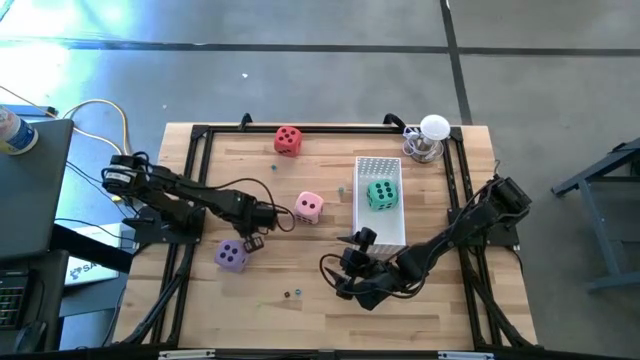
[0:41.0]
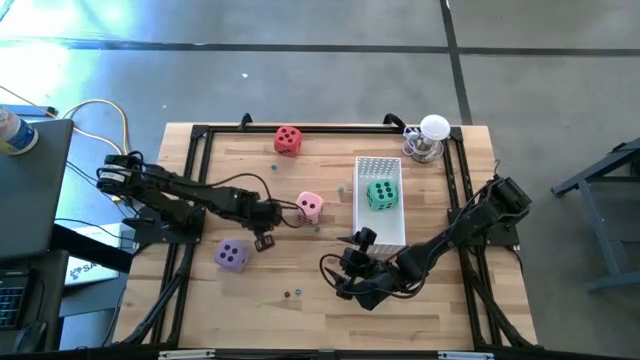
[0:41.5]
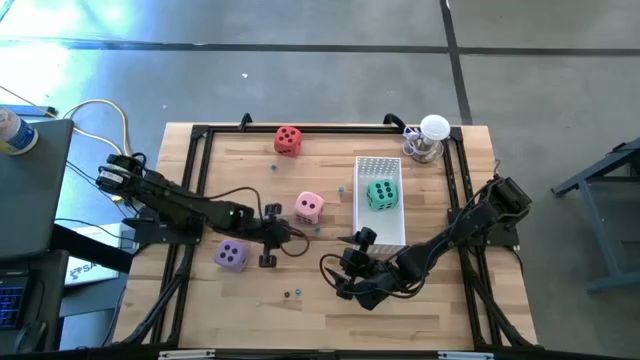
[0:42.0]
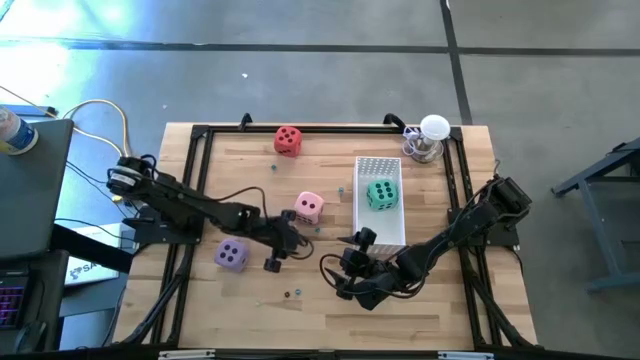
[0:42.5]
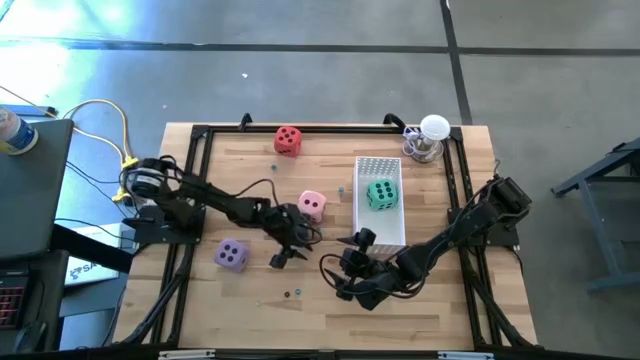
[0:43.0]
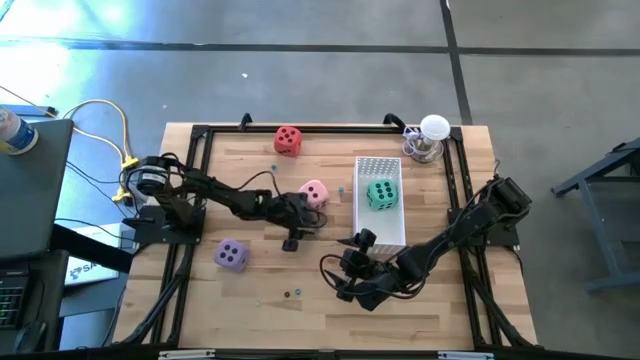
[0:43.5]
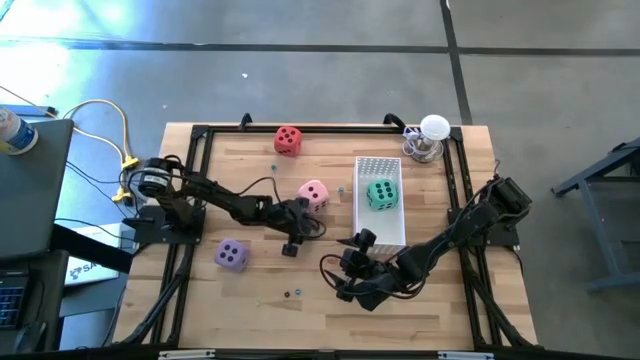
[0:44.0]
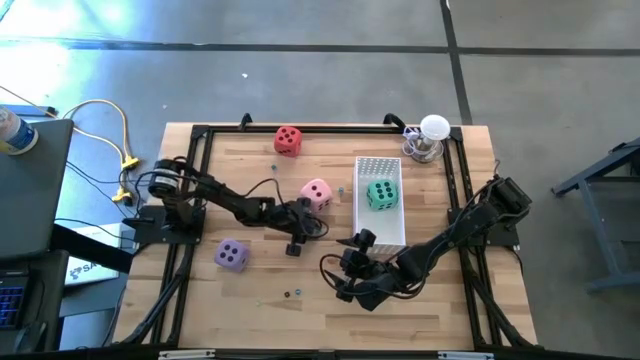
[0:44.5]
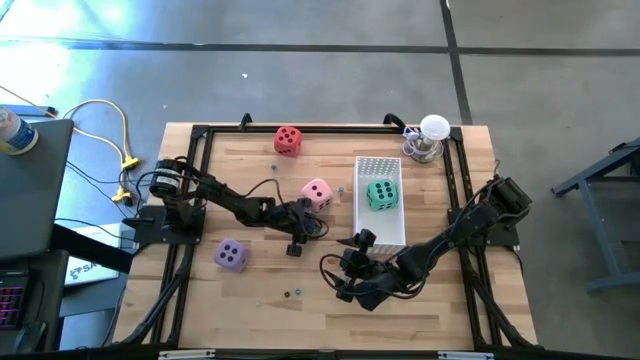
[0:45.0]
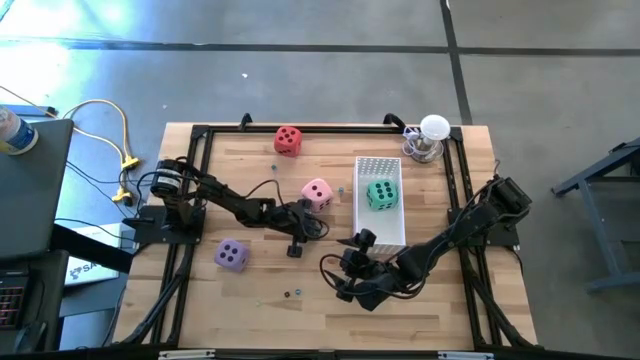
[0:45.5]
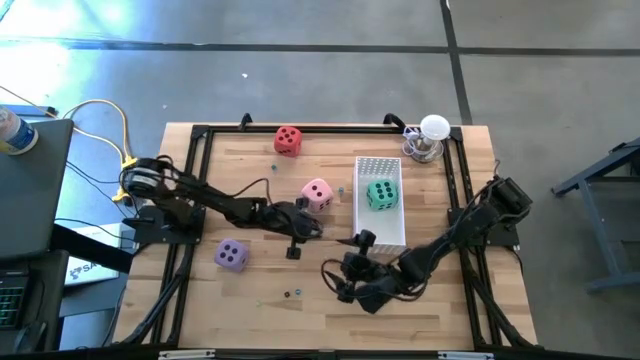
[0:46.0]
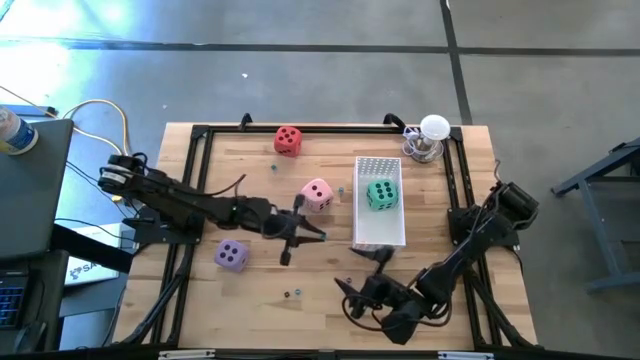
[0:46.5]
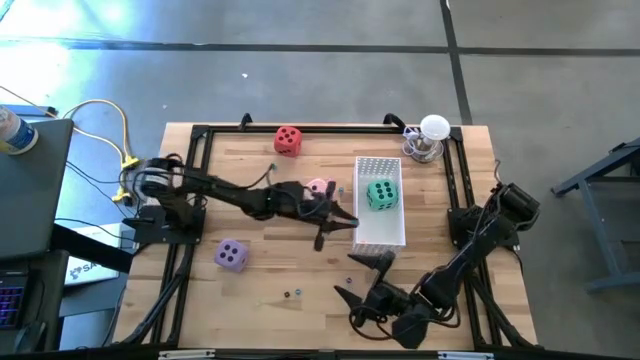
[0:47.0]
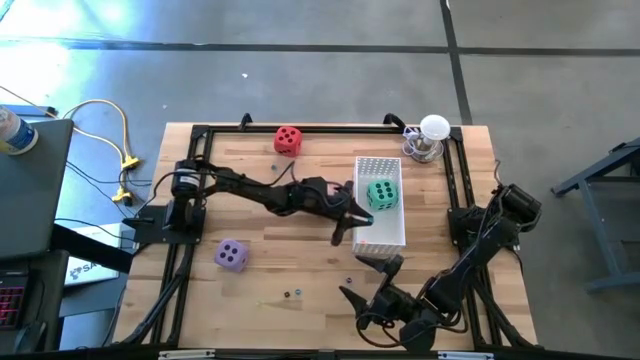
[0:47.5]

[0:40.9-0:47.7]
Task: Pick & Place Dice
Put the light blue die into the white bin

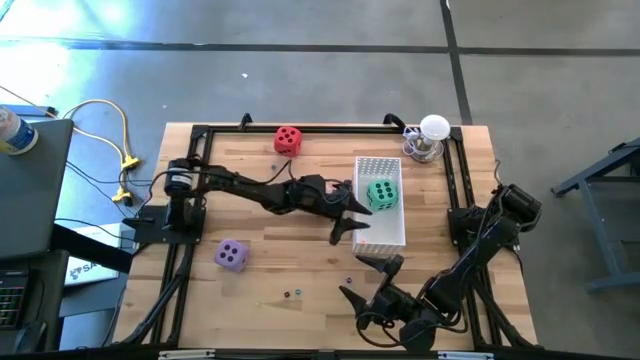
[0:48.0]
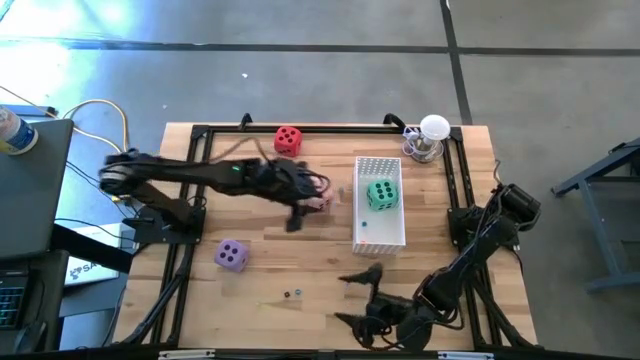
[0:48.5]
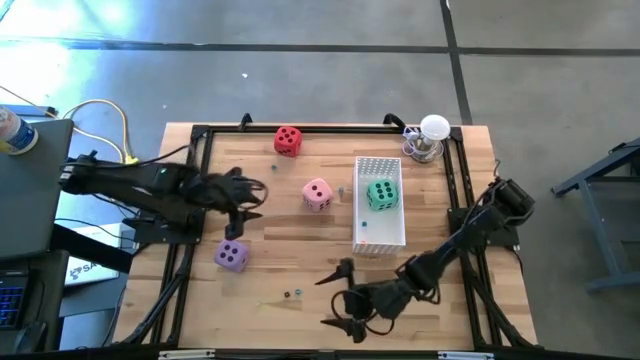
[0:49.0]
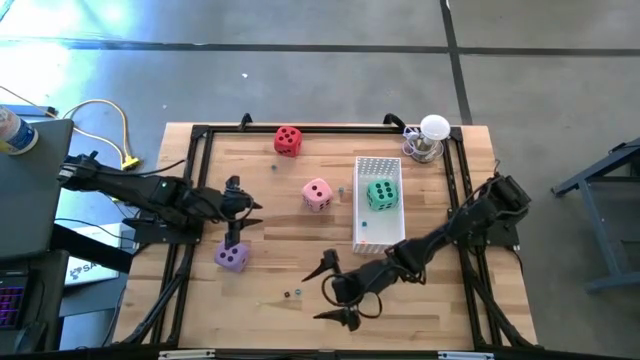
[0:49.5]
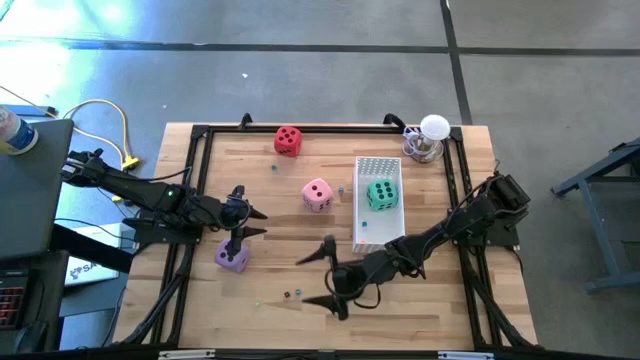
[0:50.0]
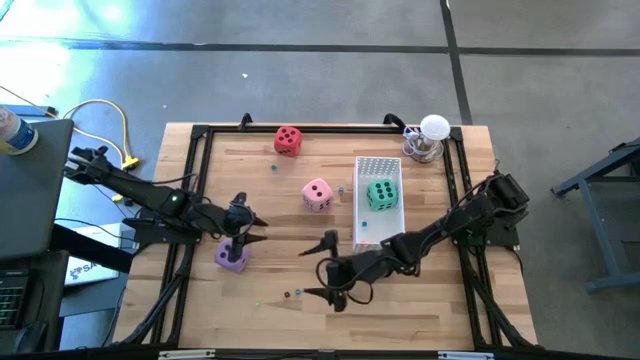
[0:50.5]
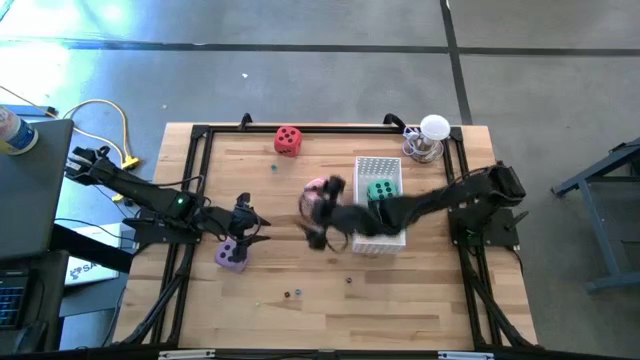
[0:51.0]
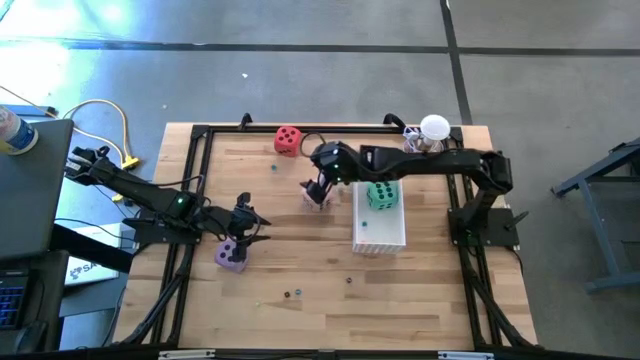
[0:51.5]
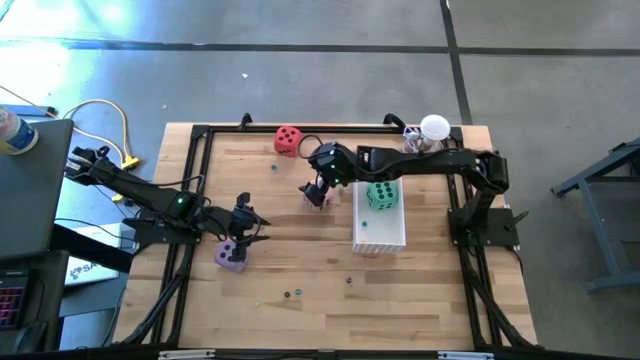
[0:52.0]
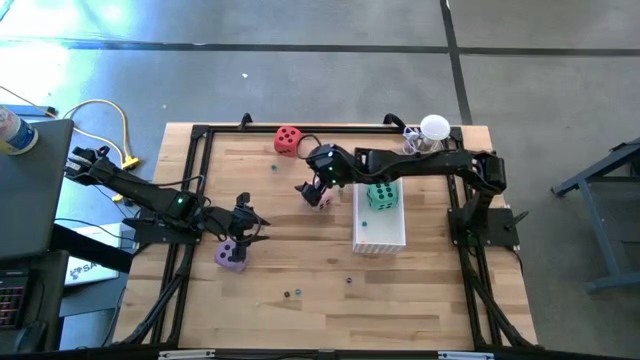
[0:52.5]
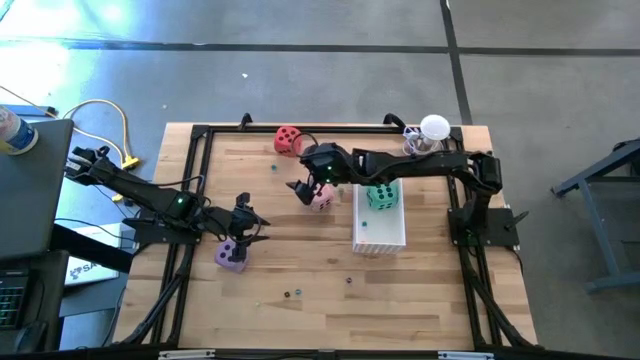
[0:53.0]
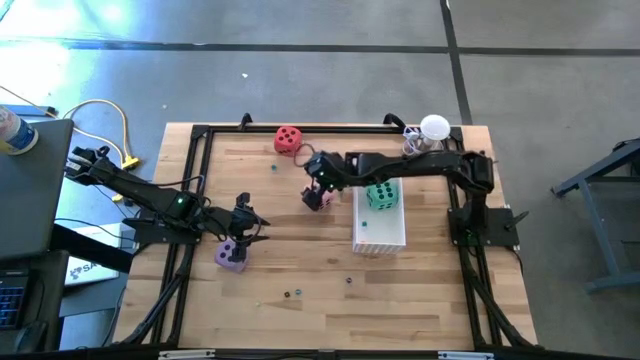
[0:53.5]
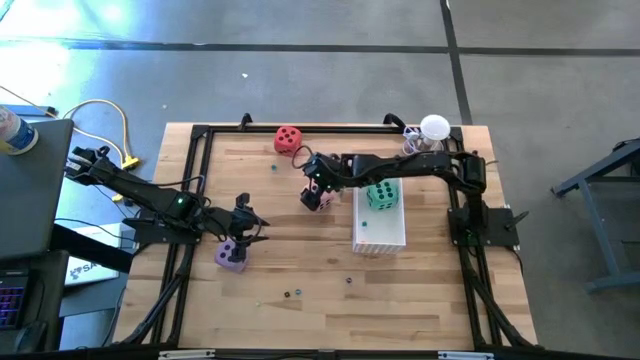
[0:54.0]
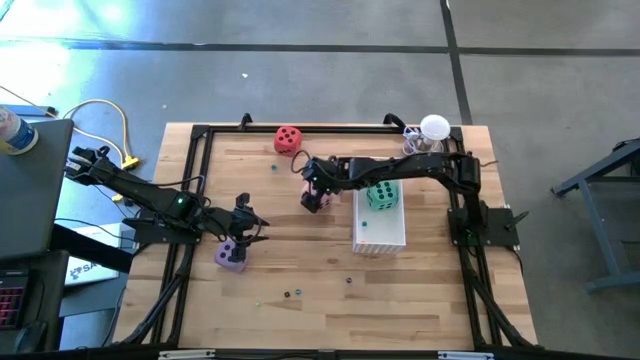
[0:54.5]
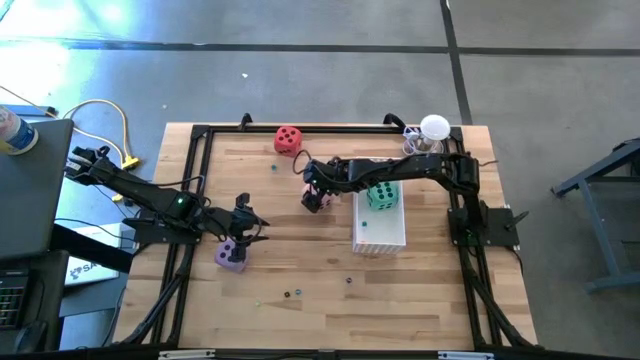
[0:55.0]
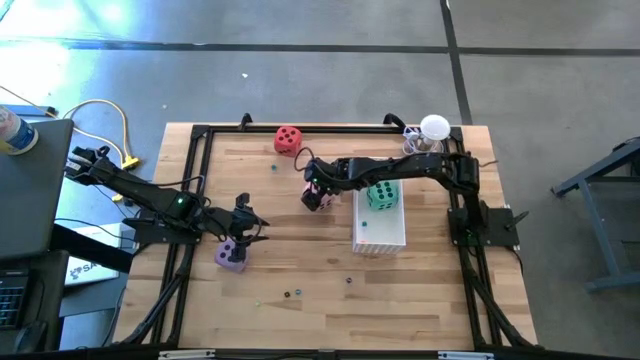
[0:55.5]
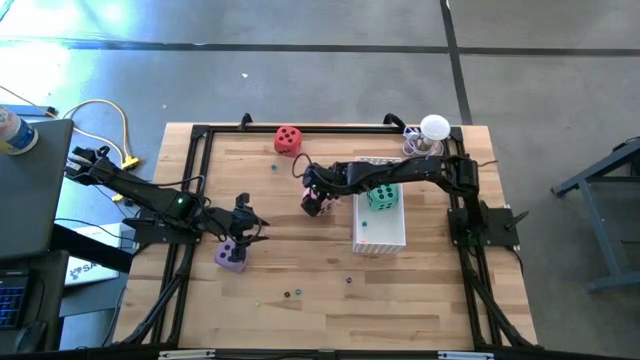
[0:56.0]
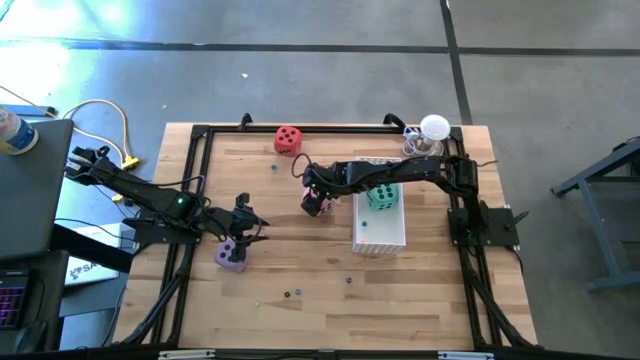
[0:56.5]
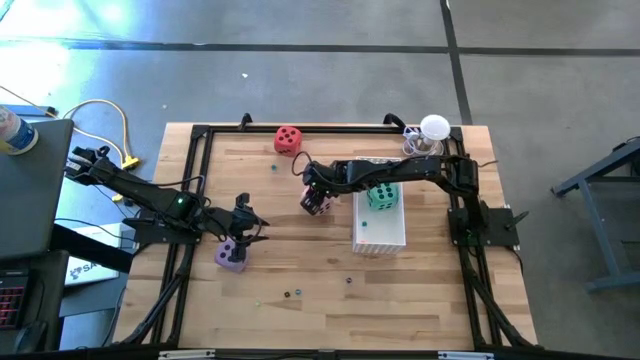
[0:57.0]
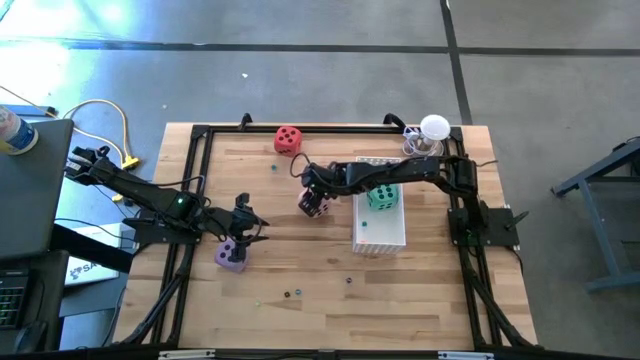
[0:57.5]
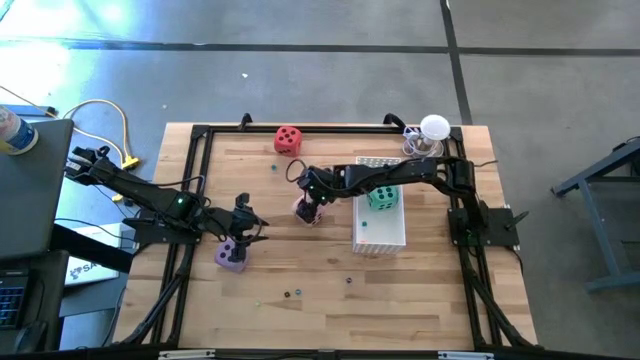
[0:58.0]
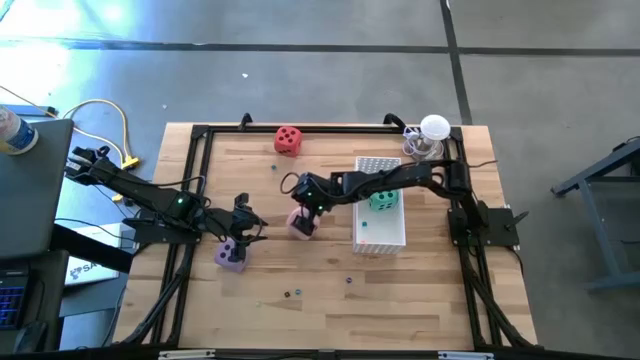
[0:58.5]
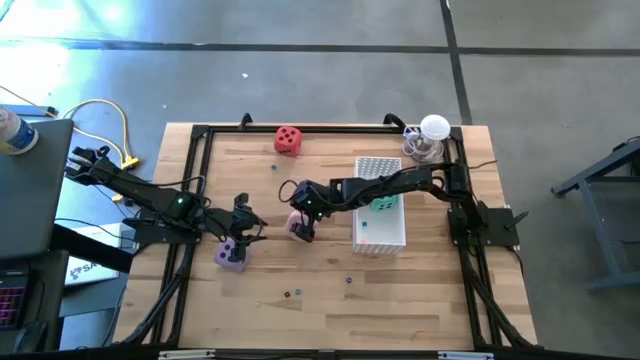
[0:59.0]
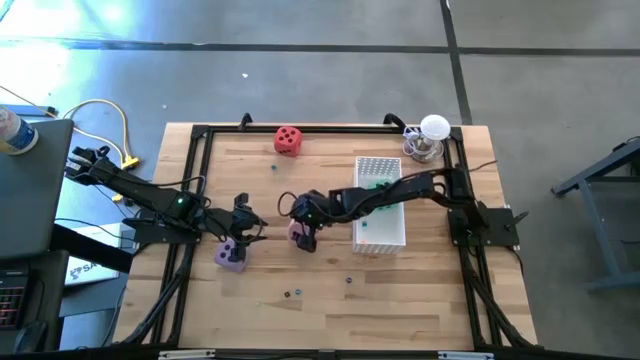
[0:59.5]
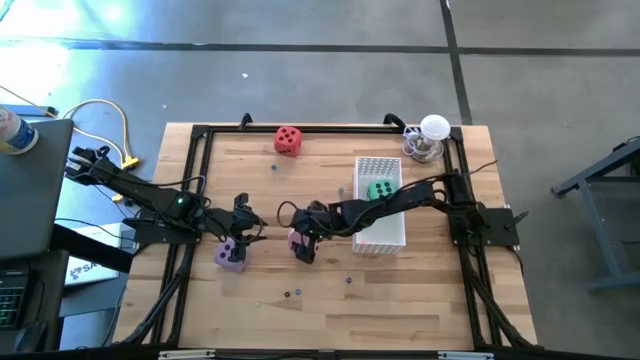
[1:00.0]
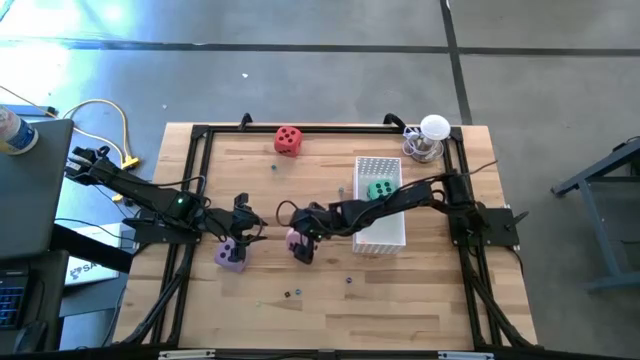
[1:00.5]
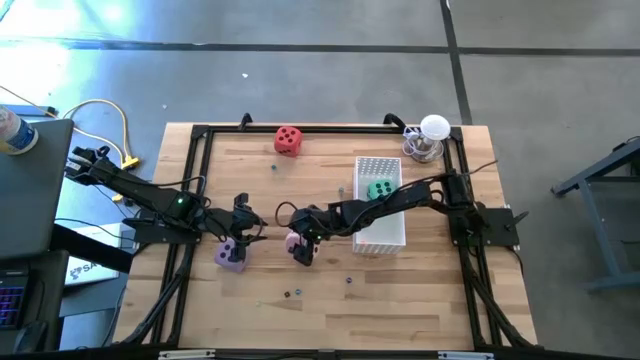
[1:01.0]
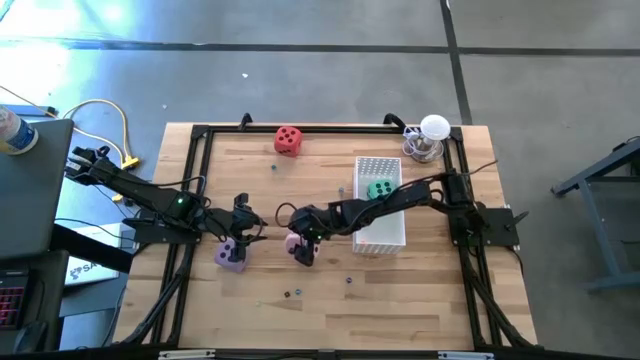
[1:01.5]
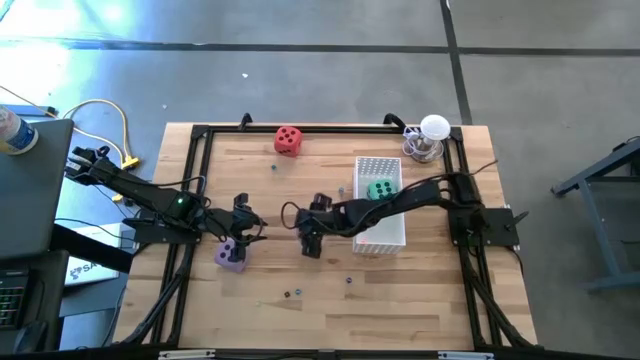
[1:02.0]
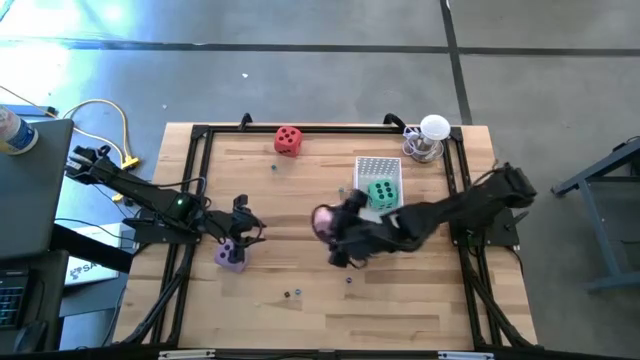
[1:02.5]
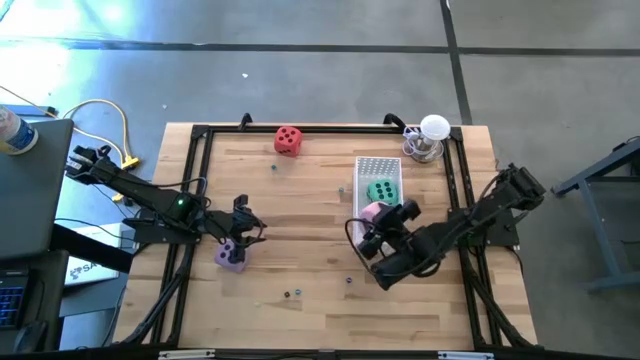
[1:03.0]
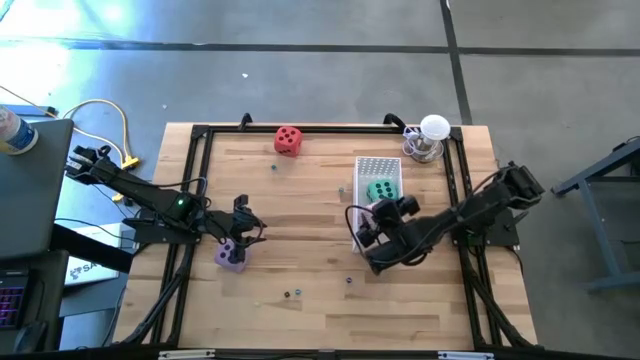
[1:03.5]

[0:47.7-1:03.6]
Put the pink die into the white bin

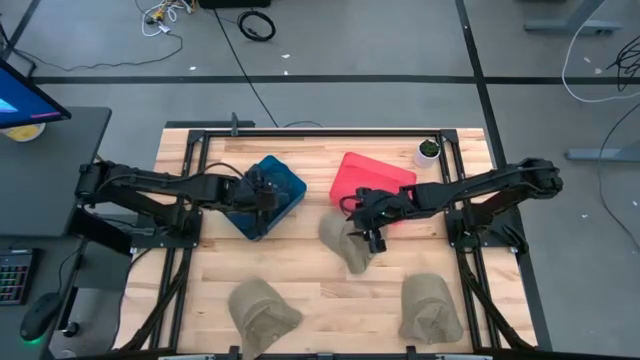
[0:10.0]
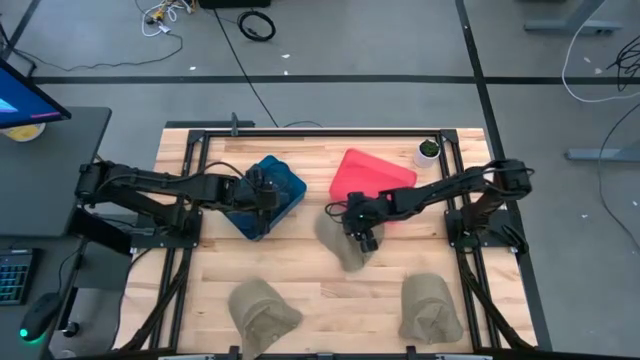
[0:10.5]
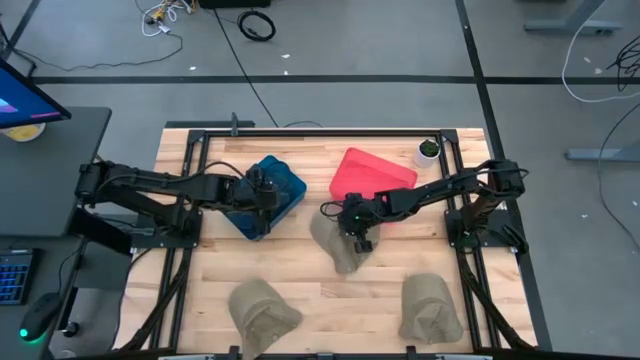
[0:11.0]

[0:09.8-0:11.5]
Task: Pick & Place hat
Put the top brown cap into the pink bin
